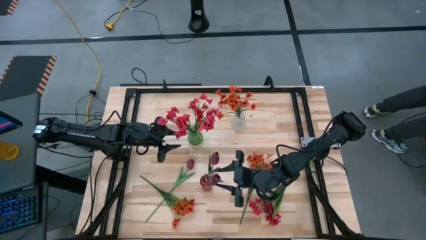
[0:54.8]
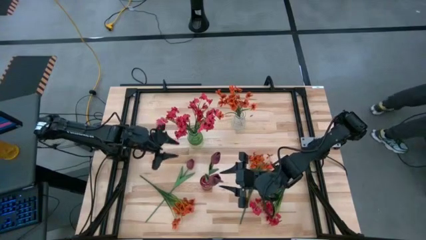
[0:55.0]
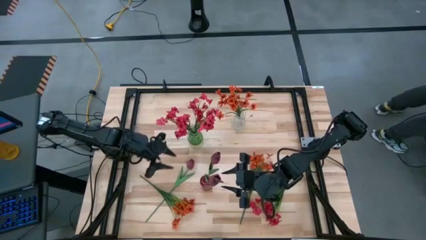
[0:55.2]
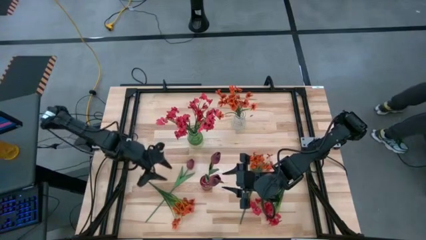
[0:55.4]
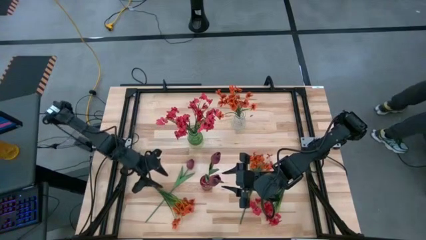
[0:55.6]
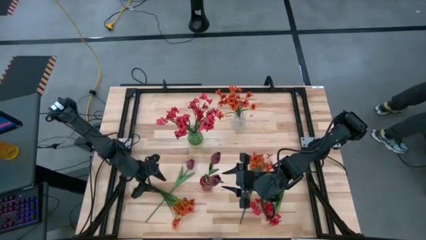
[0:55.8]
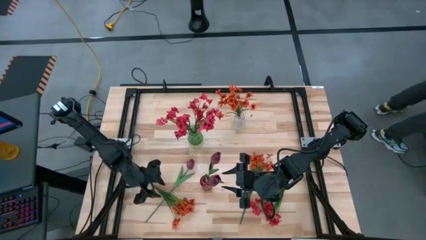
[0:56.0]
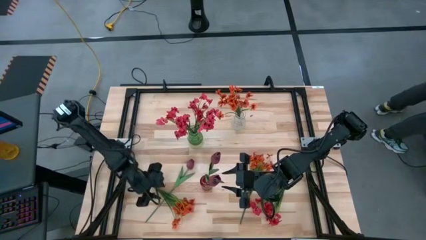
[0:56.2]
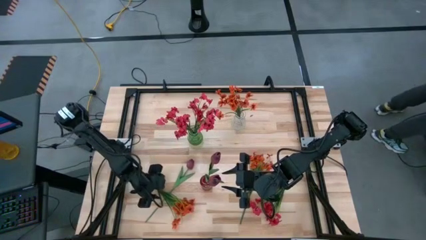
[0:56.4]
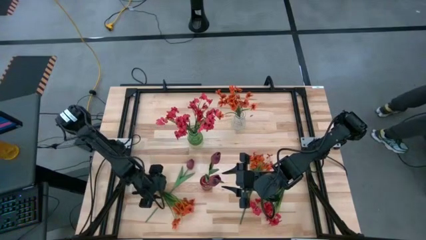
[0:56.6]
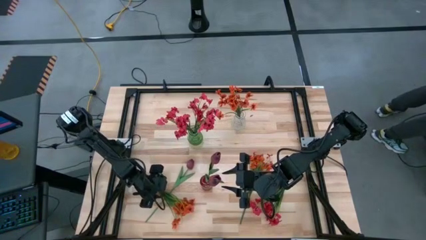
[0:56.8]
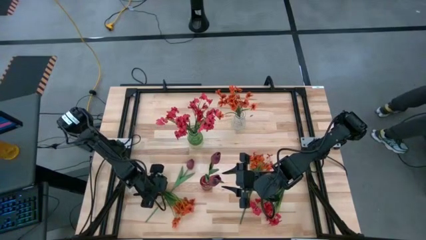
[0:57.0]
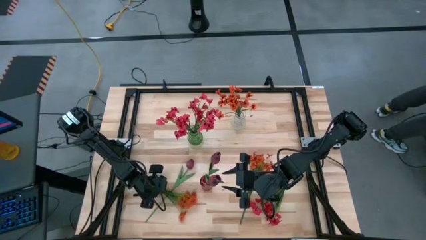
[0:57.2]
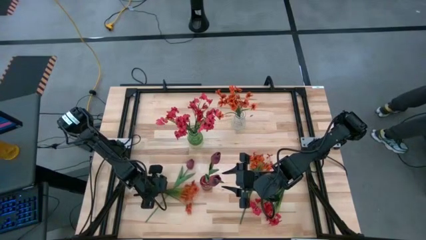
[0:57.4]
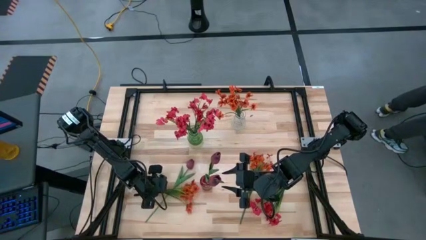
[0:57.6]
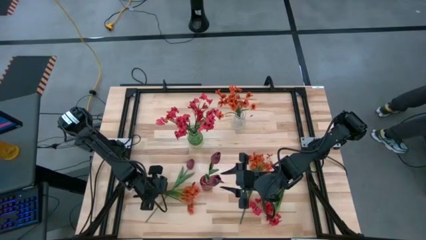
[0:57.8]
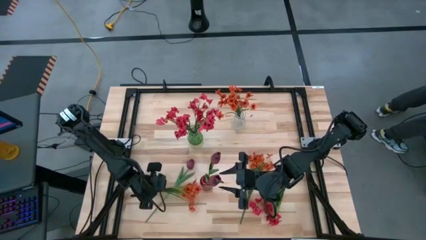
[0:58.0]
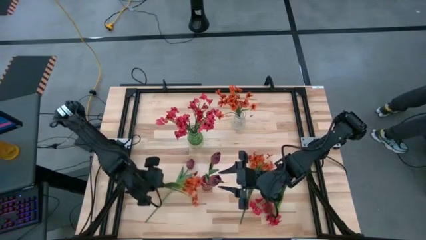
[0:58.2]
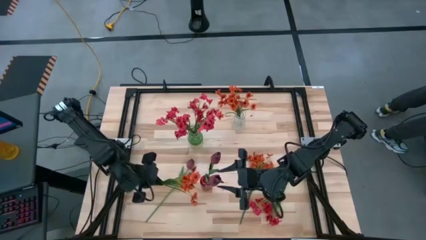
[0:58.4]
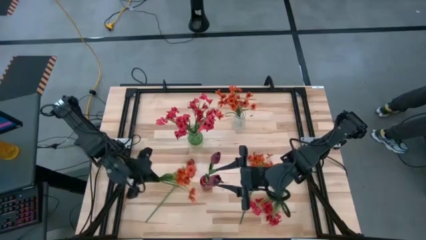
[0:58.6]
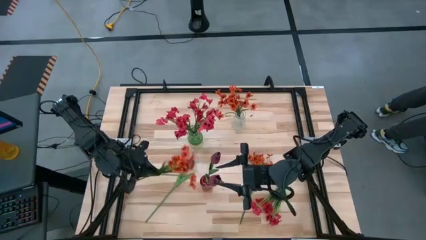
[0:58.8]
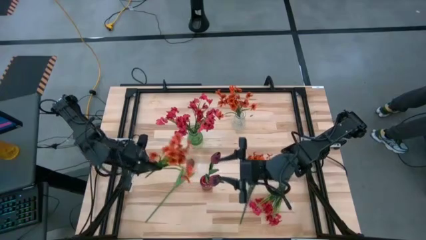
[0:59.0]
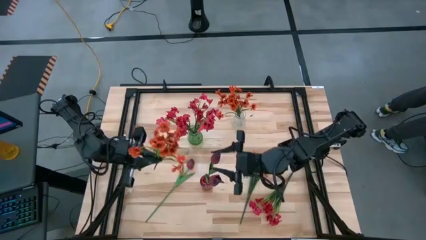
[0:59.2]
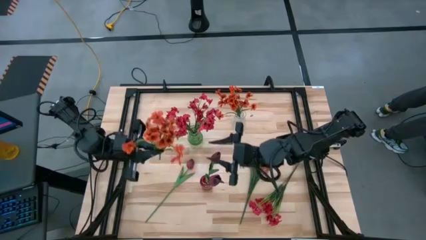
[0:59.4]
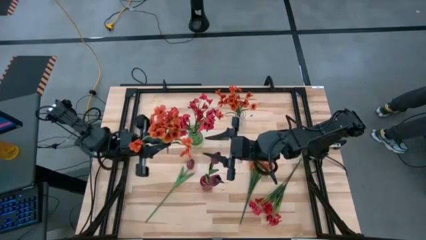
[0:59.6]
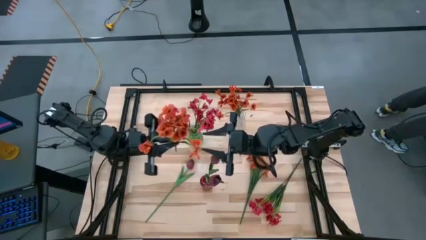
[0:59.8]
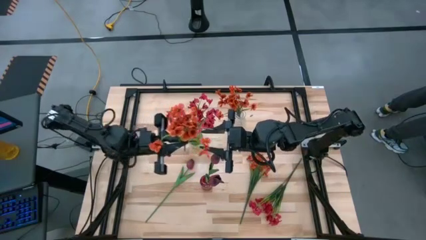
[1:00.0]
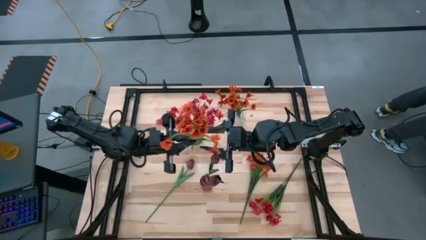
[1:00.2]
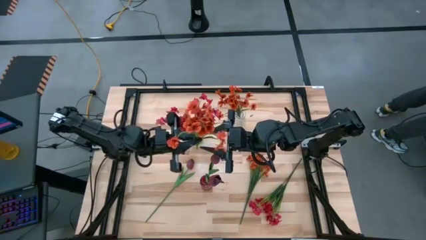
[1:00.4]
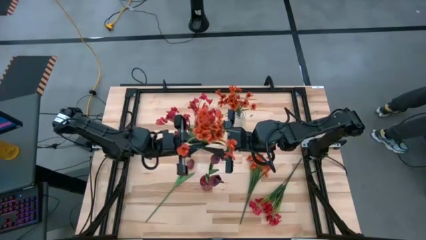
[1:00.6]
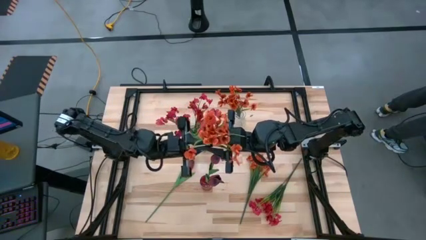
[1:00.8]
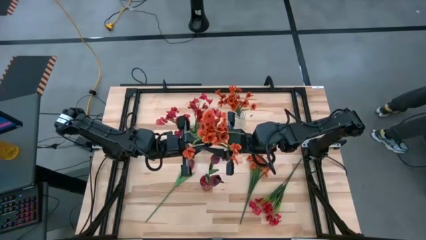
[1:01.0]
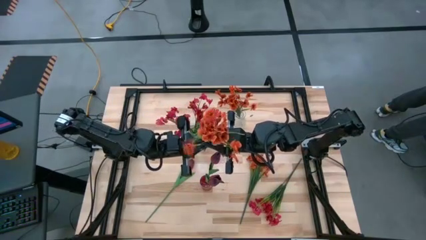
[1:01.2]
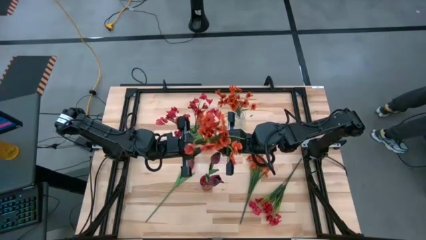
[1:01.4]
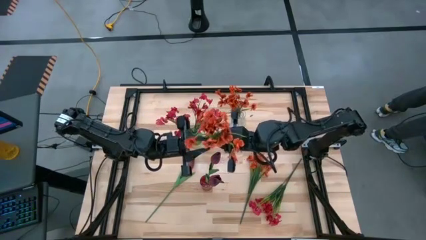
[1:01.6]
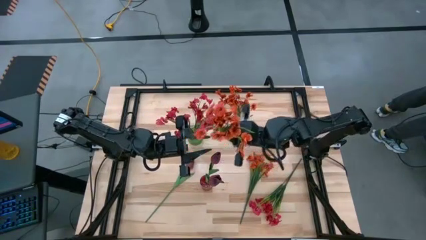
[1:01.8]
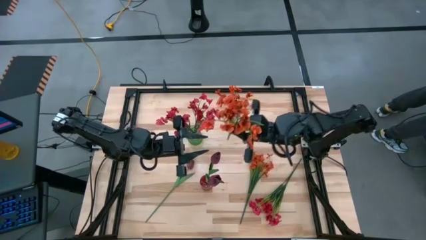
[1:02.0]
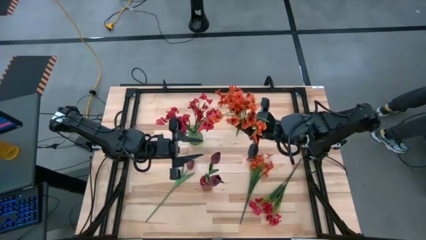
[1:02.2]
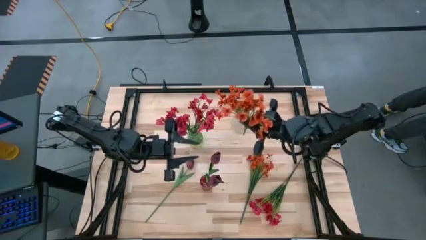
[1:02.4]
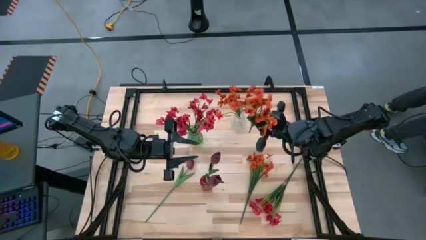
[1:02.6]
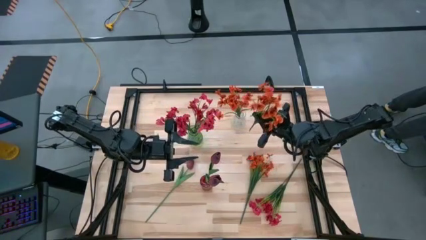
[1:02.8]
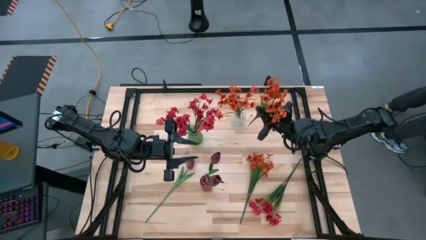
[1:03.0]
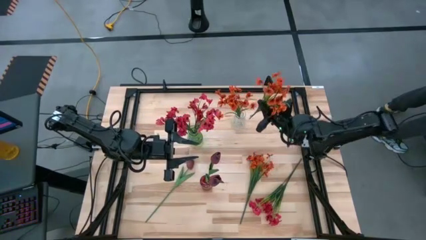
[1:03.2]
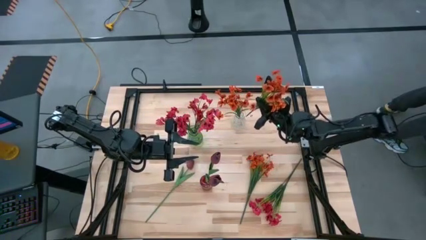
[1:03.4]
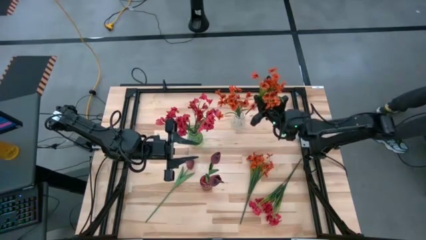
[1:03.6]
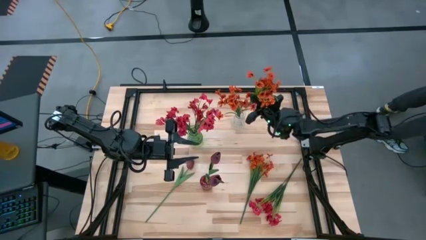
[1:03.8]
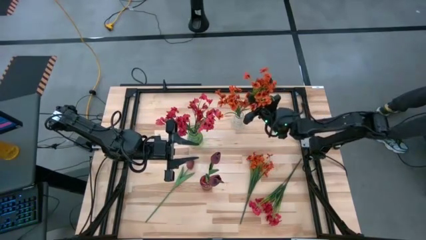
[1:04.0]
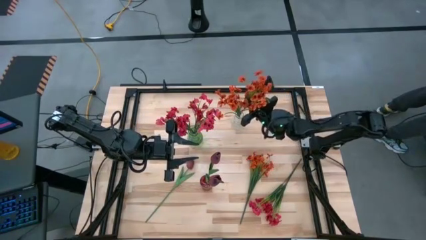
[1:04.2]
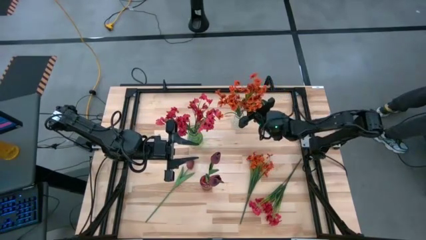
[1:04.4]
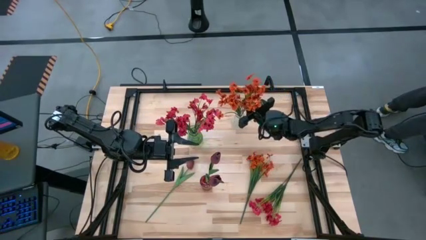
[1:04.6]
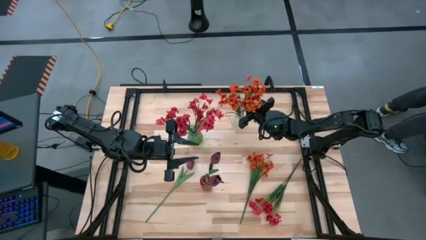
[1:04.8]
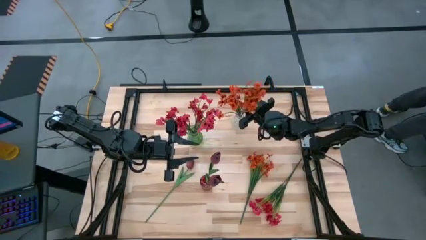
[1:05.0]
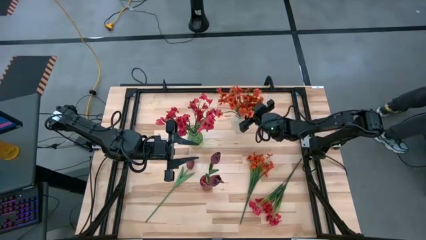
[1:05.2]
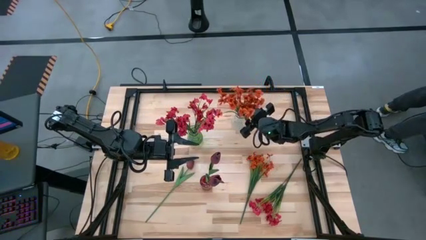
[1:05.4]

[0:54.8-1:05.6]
Task: Sort flowers into vase by color
Put the left orange flowers into the transparent vase

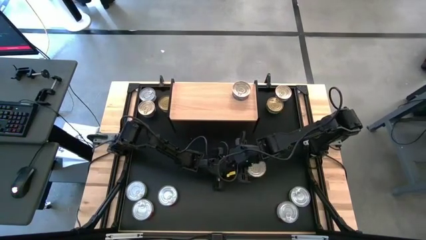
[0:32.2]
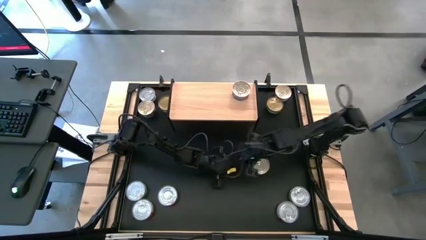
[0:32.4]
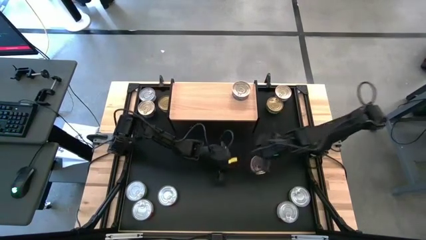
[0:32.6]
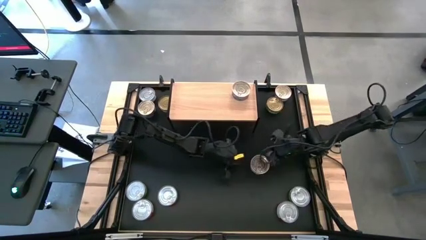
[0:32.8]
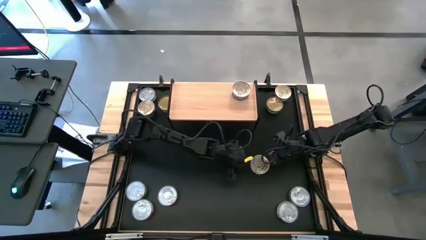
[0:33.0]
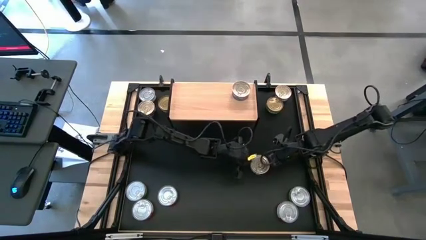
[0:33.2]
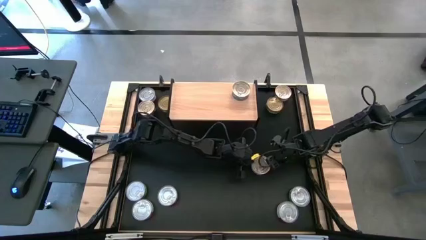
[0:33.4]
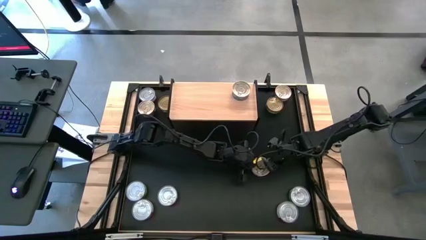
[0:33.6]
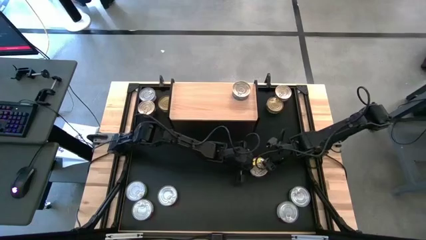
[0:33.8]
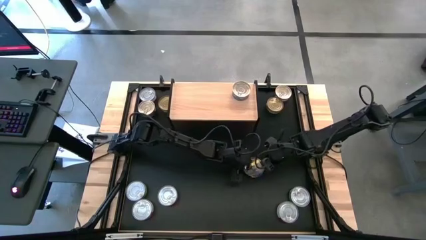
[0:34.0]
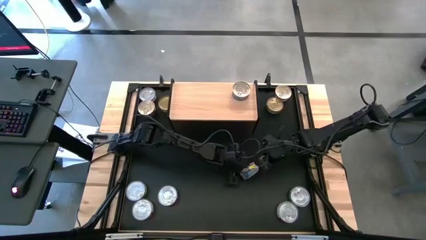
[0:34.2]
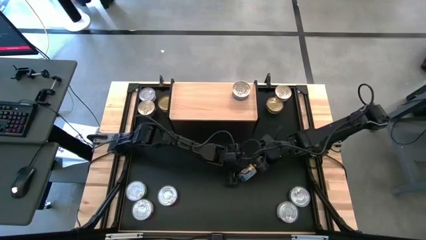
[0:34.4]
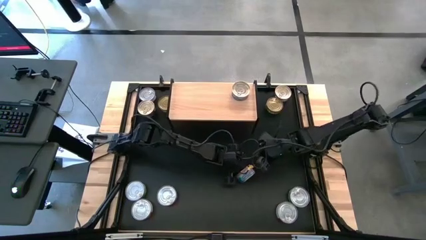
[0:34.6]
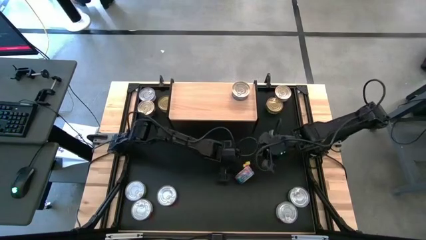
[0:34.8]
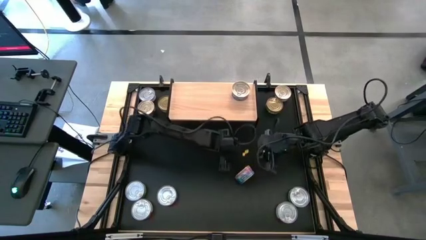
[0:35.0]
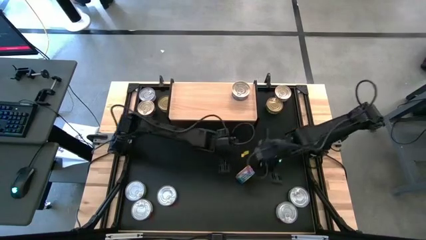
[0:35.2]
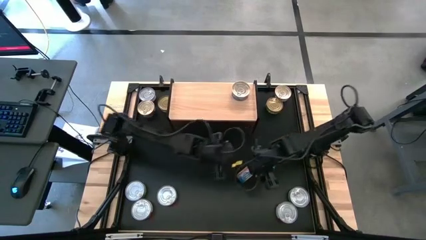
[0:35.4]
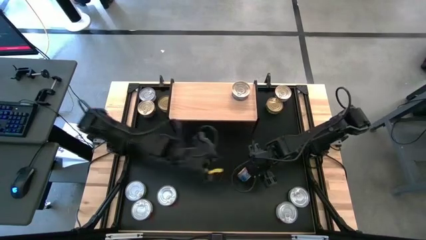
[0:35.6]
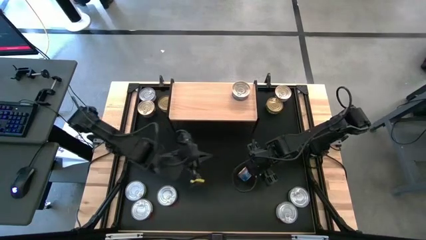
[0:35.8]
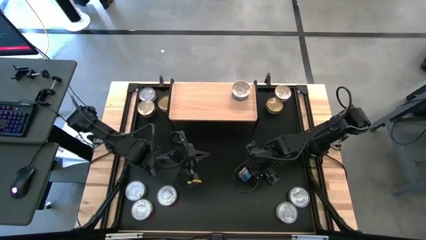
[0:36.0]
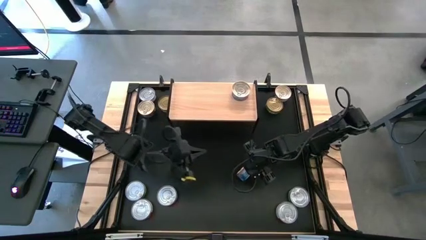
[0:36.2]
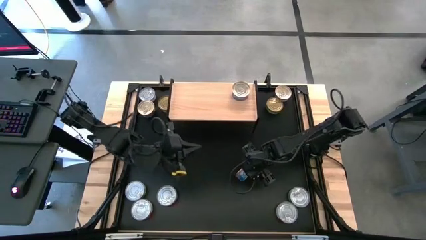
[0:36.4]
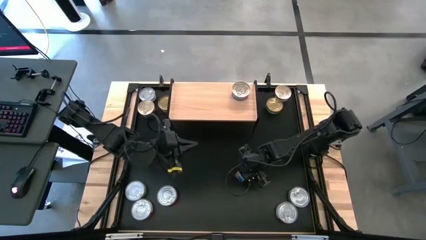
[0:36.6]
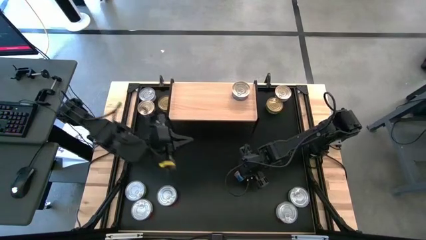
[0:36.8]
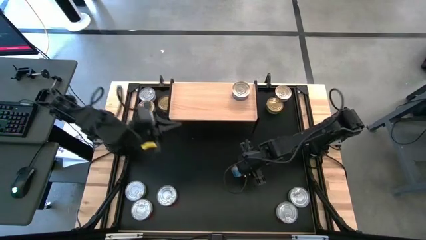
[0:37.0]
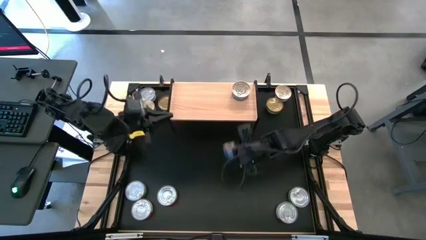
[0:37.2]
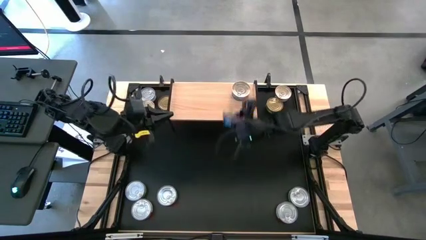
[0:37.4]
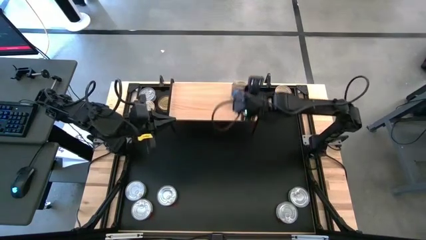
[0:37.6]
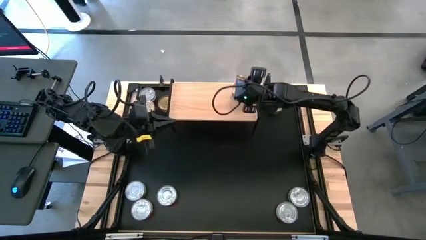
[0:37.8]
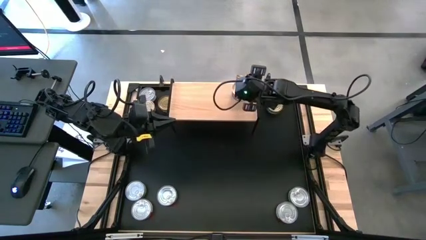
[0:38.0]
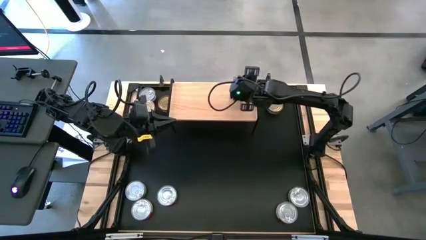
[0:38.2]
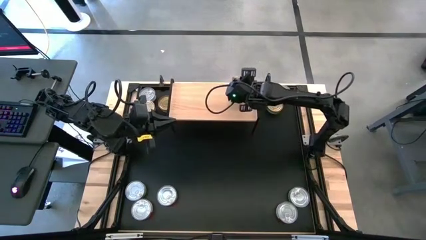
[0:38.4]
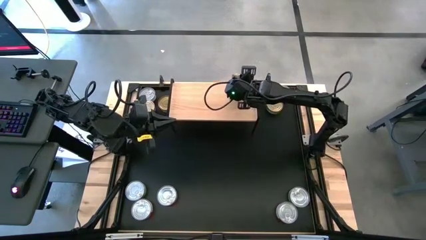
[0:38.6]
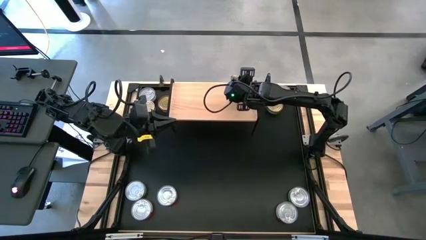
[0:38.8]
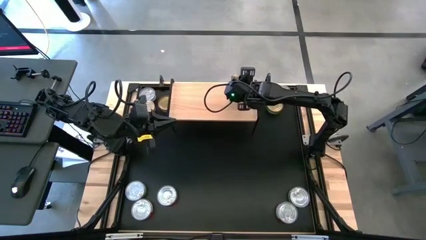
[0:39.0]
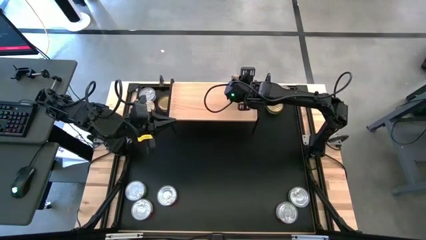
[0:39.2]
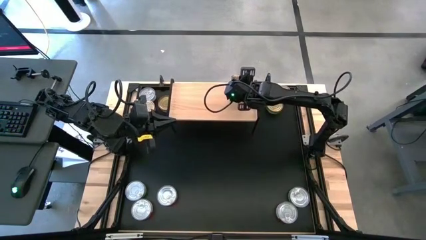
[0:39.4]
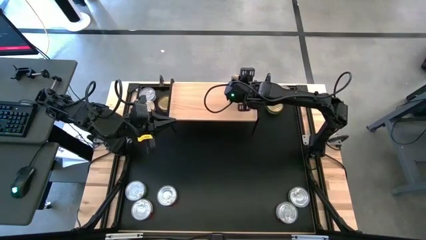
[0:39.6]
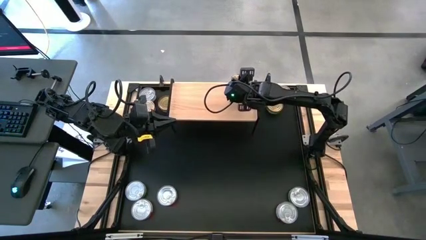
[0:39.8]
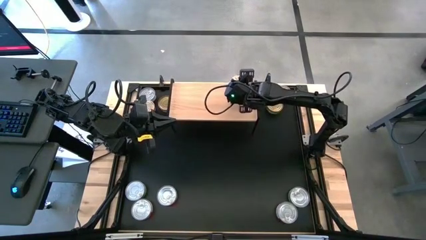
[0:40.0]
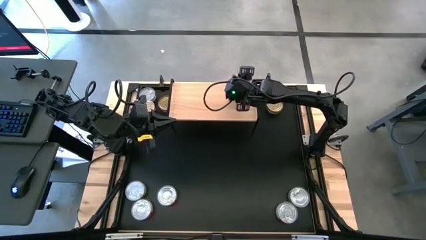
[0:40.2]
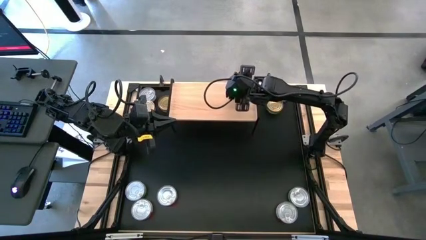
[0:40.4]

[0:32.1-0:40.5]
Task: Stack canned seafood by type on shelf
Stack the blue and pink tuna can on top of the blue and pink tuna can on the shelf
